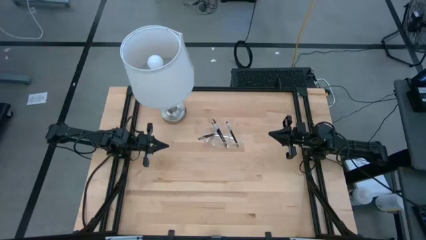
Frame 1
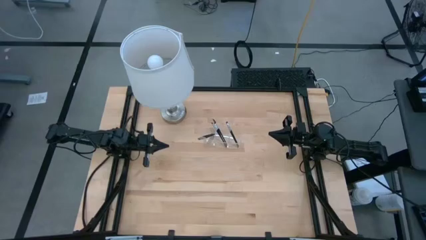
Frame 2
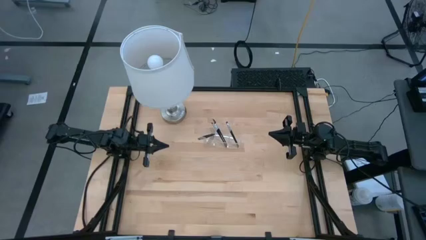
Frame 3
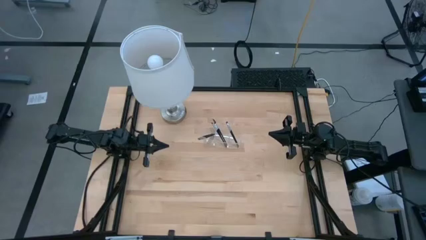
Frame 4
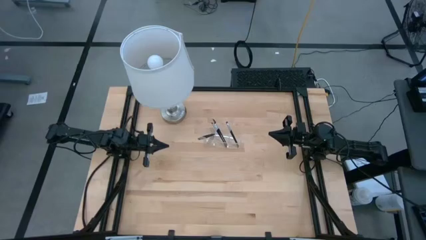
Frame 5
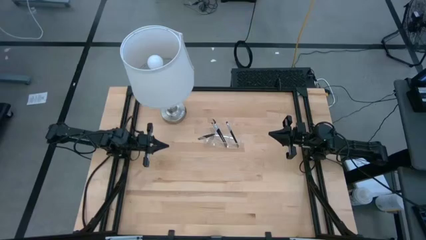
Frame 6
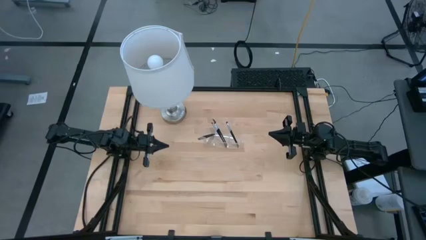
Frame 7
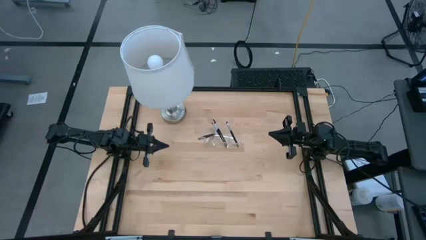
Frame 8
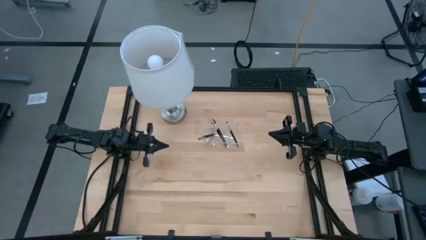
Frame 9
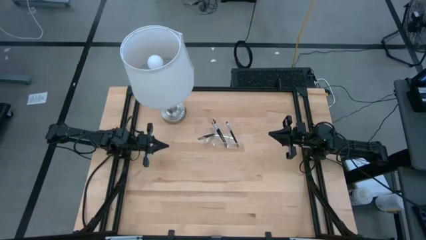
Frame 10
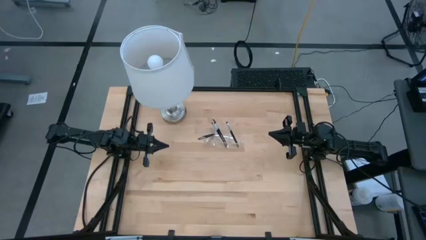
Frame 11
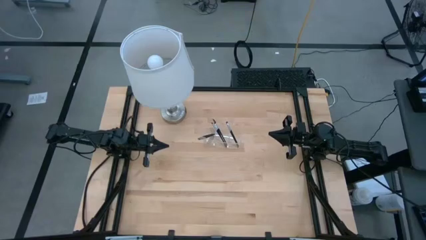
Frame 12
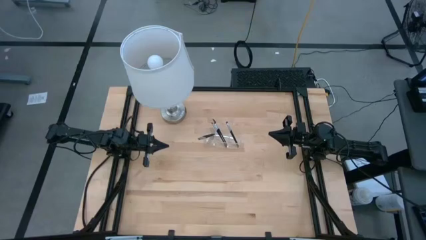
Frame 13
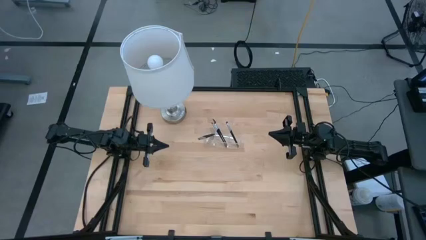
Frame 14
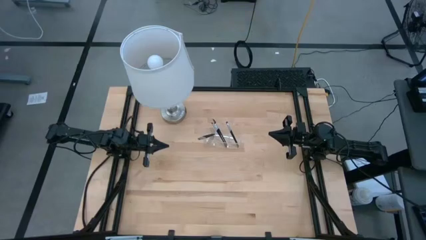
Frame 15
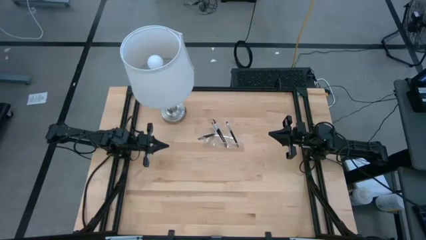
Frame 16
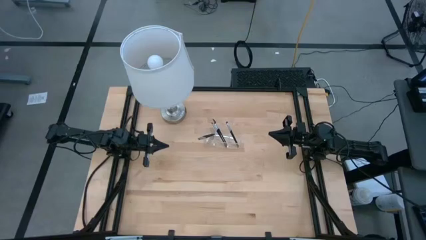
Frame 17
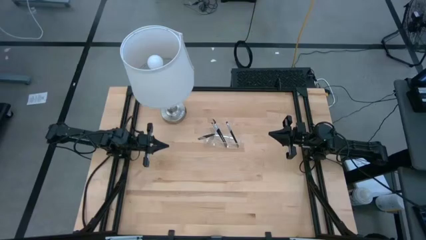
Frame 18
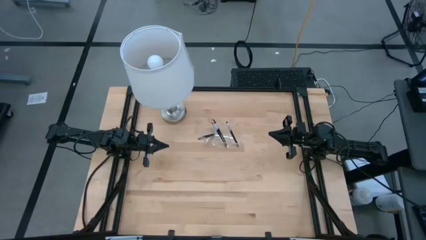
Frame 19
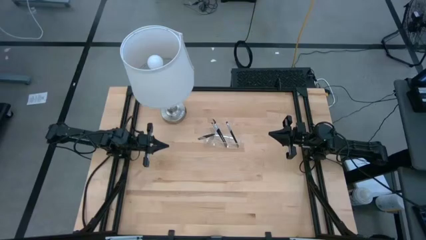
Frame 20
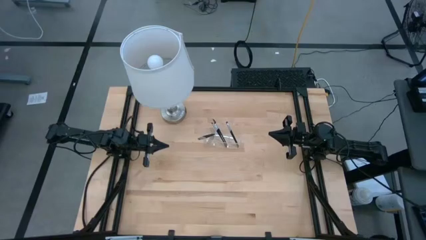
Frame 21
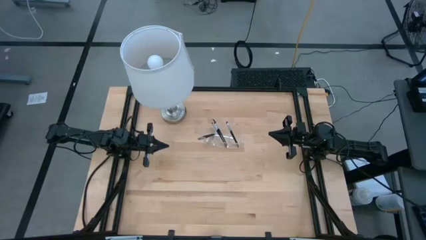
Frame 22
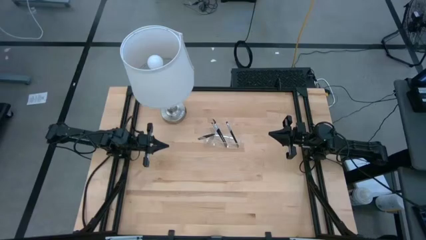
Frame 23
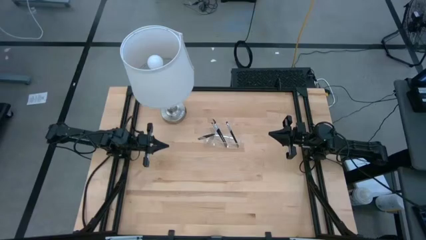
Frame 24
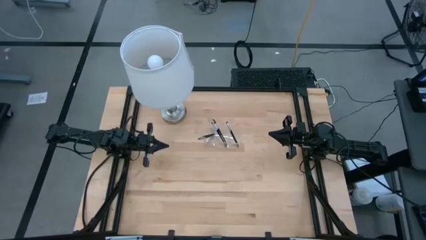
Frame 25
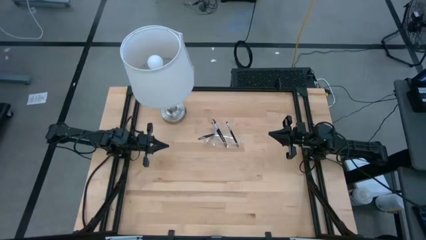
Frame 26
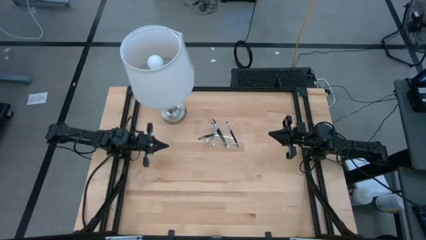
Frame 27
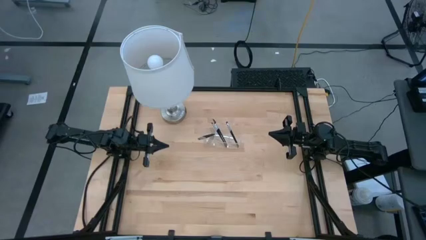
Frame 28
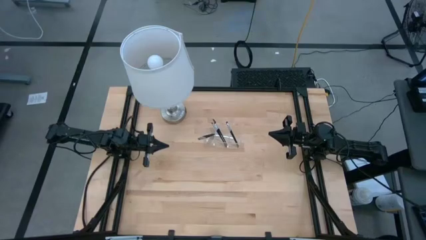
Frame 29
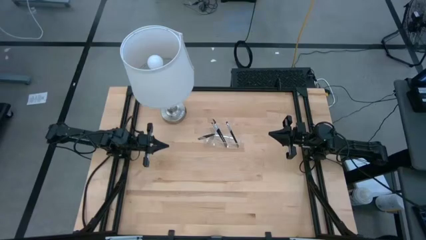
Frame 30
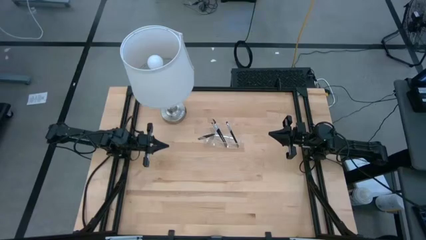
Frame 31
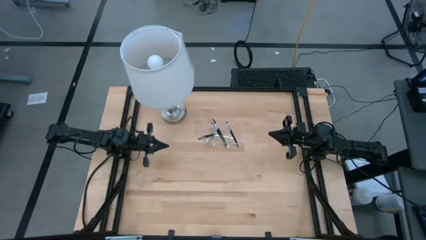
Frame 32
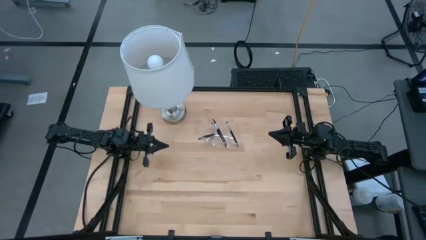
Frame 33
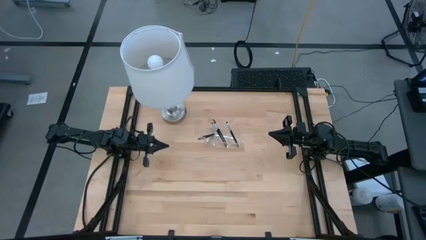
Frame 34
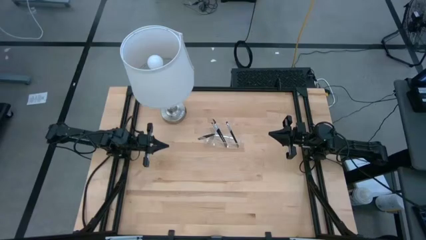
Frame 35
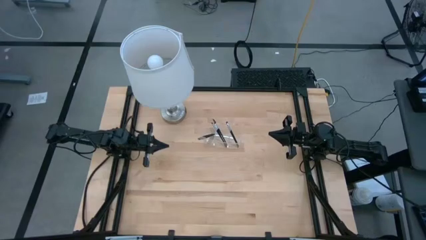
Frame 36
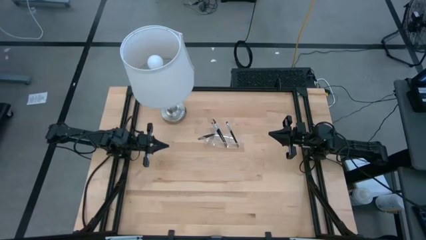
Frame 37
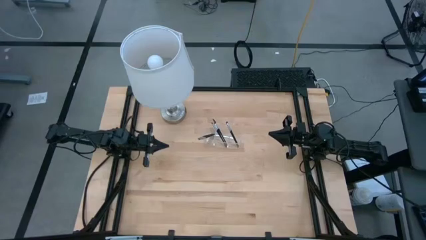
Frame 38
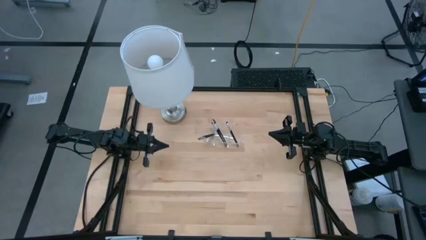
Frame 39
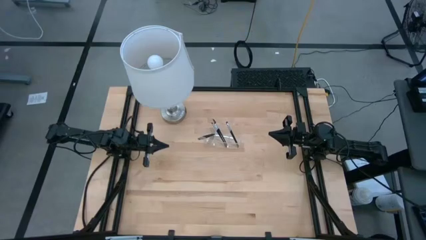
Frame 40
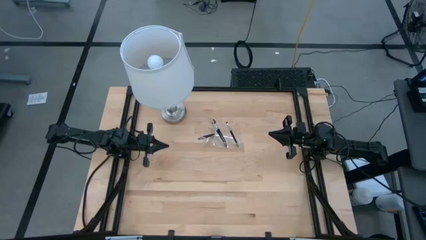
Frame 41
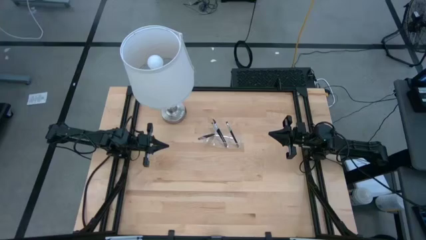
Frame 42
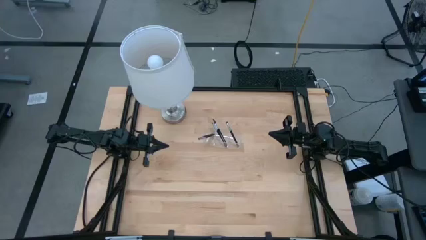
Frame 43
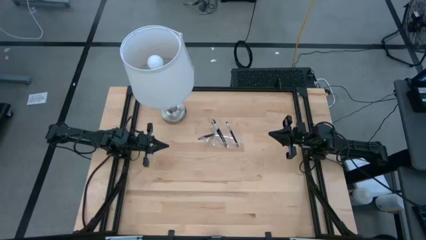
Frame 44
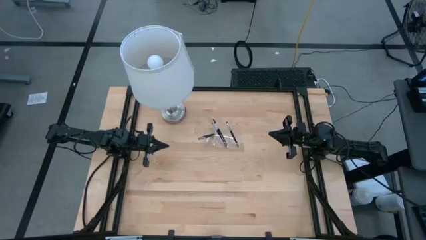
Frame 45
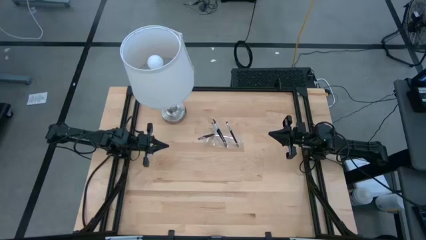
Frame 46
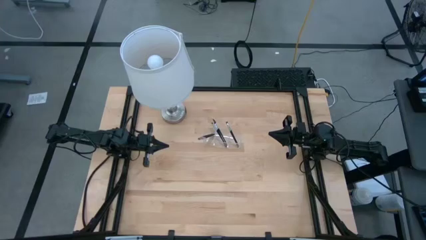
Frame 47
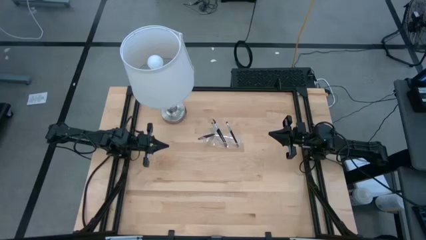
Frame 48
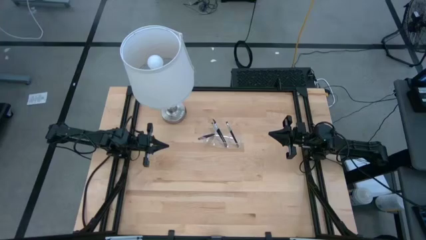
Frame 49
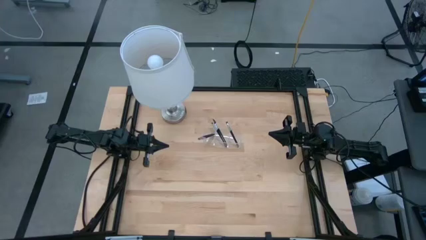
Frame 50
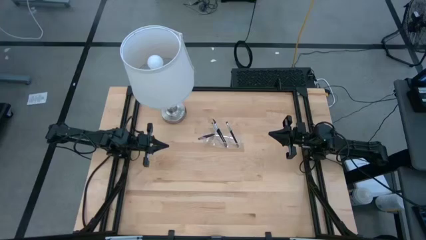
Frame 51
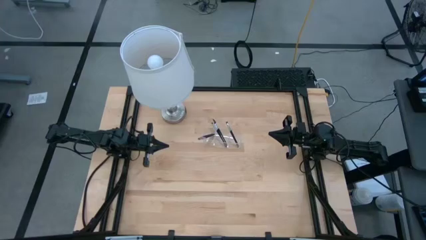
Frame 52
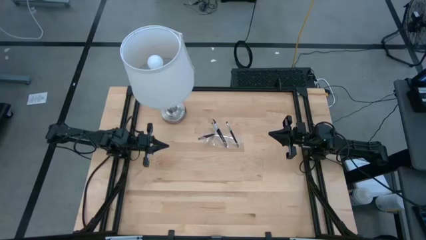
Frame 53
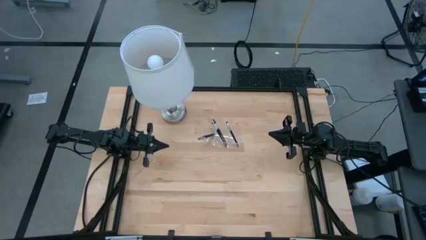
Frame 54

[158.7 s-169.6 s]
Task: Sort items
Return to Home Position

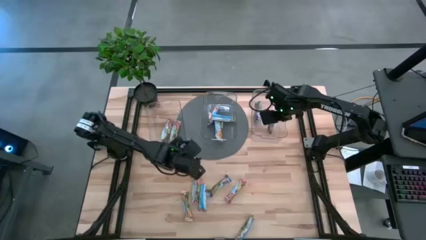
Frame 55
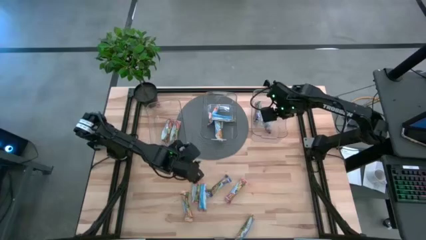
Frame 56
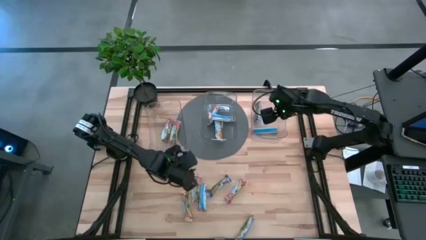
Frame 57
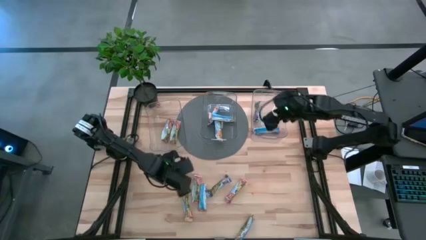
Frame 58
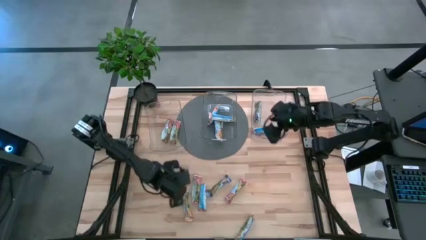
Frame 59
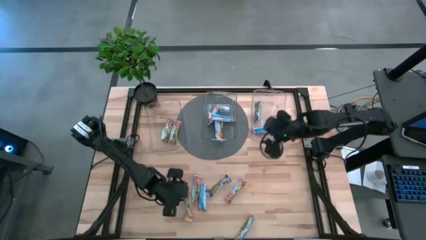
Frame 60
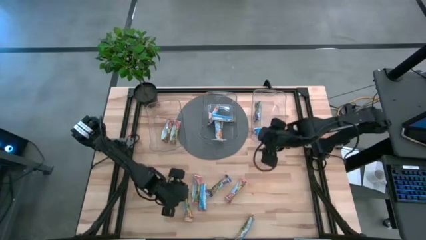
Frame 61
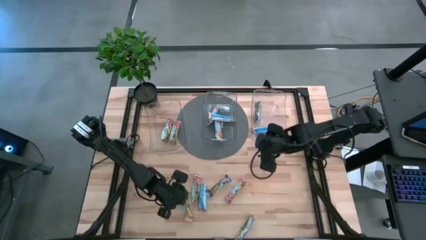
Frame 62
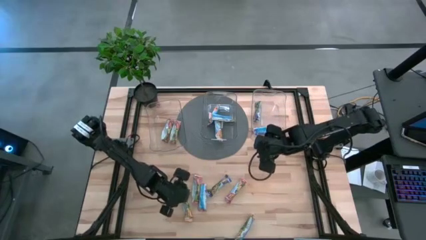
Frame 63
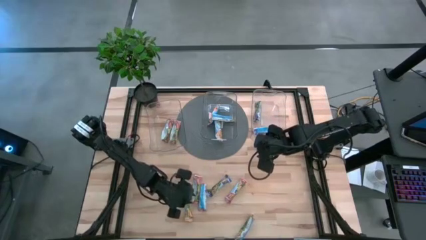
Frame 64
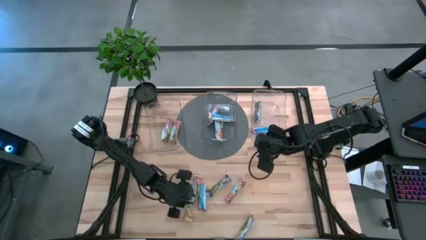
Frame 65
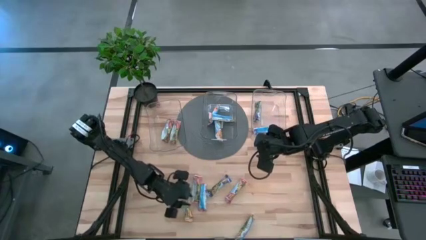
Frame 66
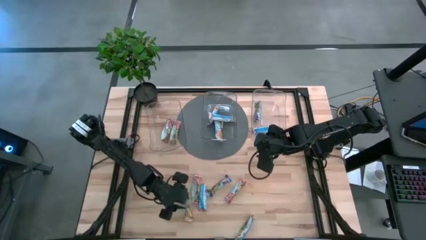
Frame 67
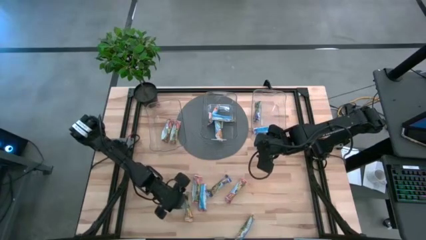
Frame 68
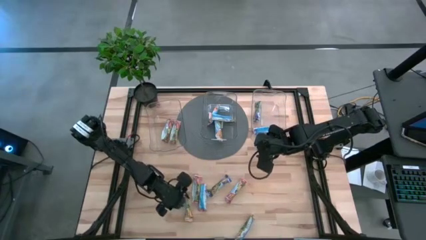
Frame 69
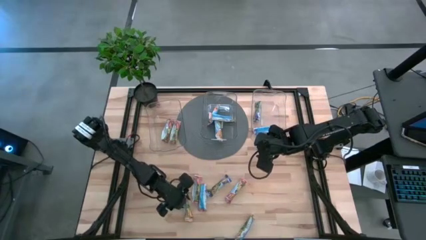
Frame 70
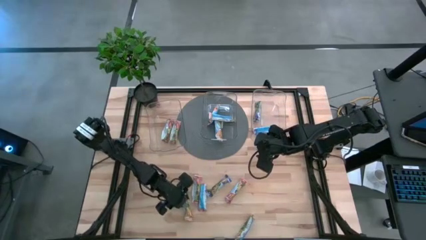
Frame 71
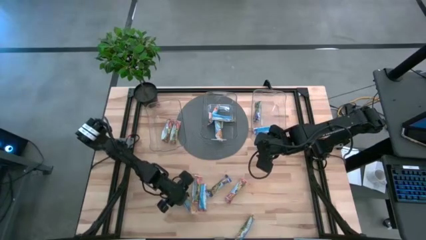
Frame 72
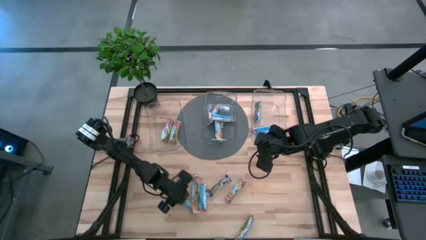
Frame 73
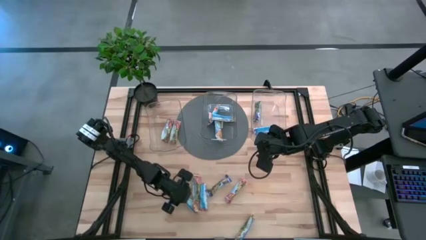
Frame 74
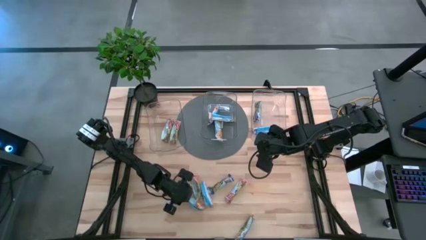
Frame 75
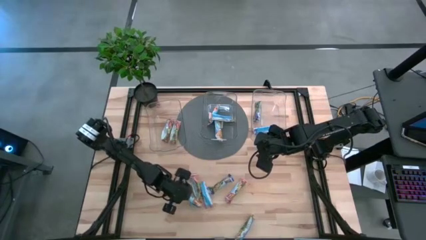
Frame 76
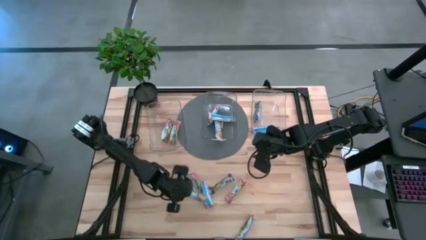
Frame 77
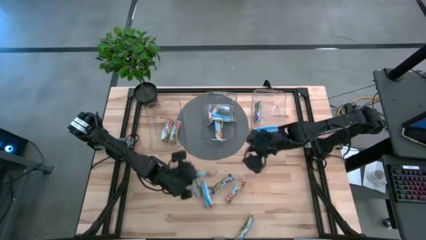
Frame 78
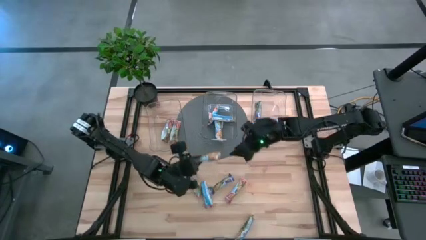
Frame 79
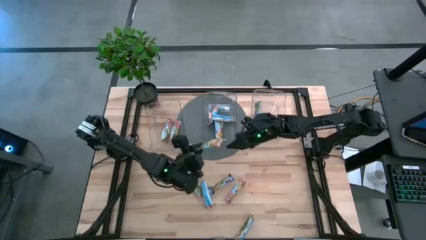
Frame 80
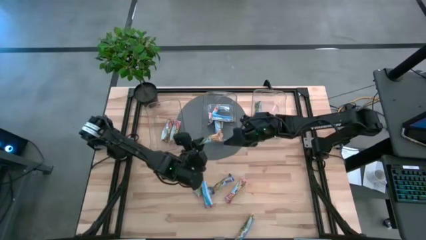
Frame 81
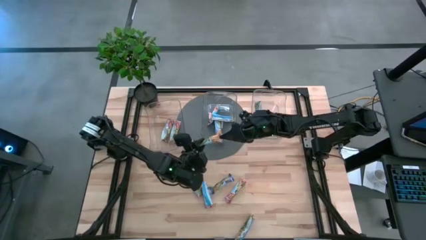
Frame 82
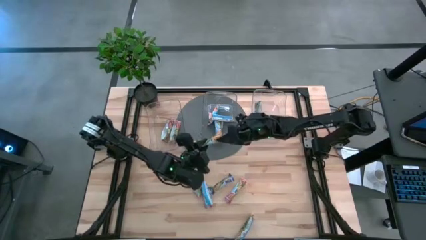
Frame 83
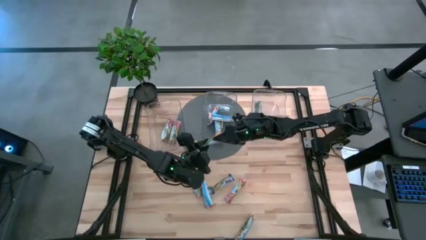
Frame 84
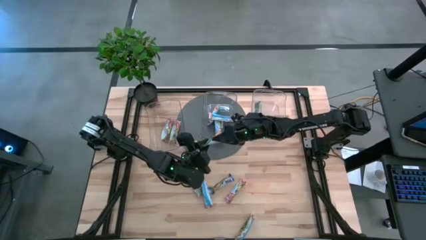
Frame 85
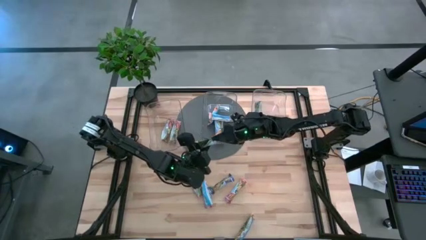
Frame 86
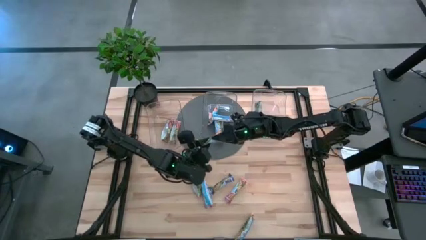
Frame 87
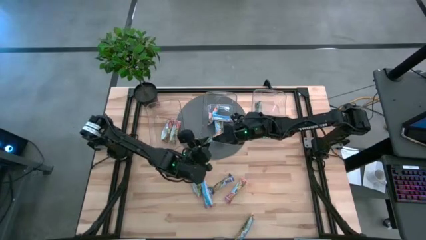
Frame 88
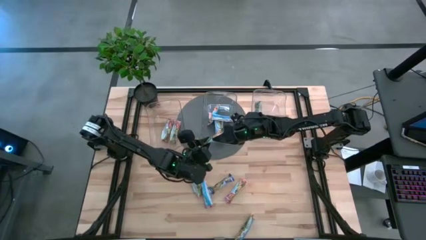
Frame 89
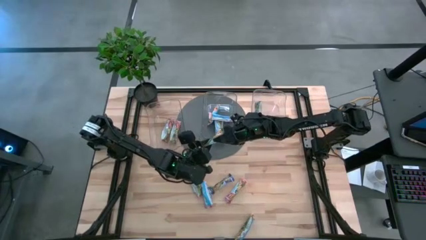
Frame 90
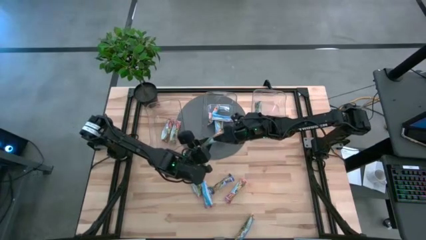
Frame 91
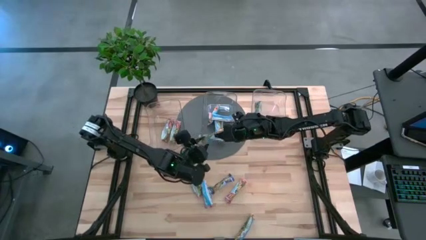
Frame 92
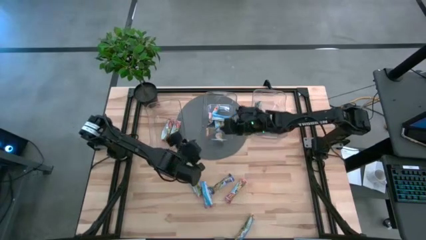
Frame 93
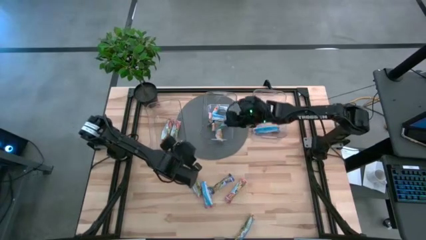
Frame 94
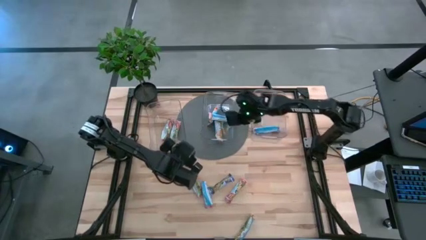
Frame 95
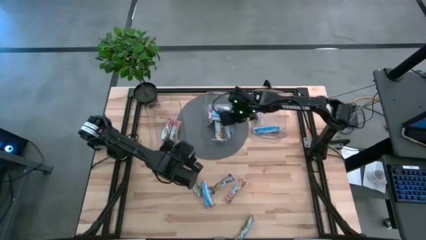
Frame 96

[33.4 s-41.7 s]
Task: Pick and place Granola Bars by type
Put the yellow granola bar into the center transparent bin
